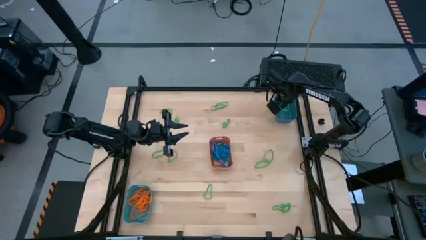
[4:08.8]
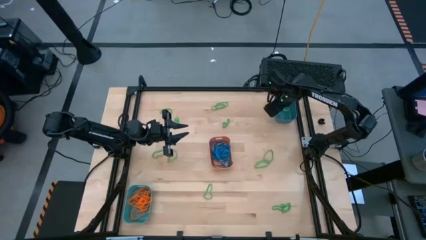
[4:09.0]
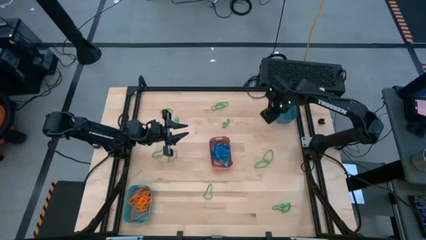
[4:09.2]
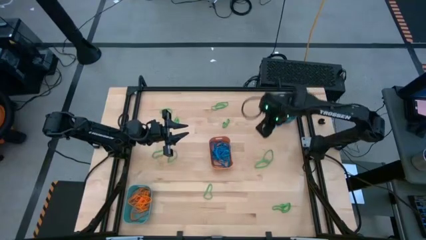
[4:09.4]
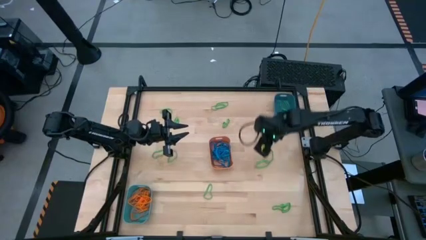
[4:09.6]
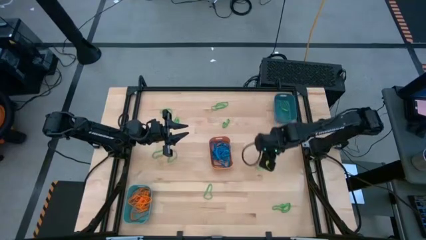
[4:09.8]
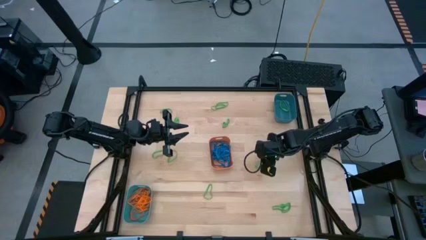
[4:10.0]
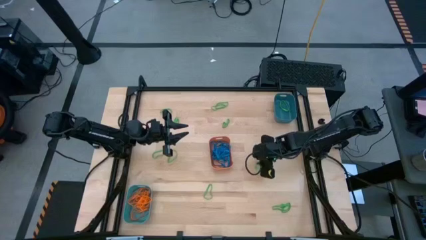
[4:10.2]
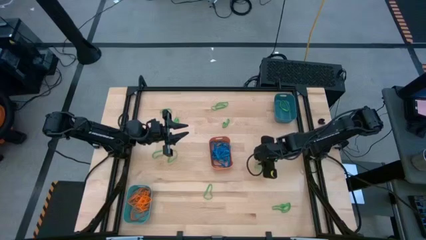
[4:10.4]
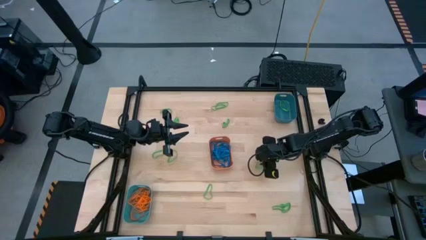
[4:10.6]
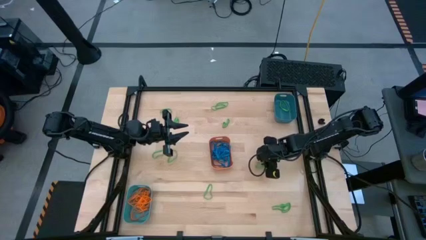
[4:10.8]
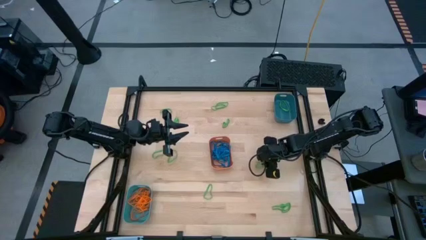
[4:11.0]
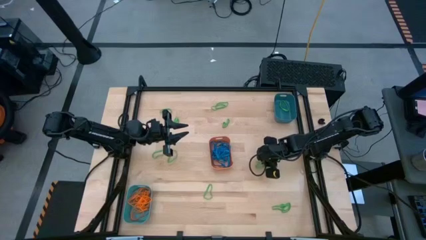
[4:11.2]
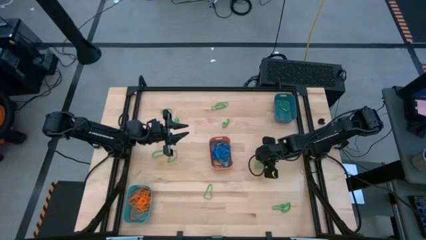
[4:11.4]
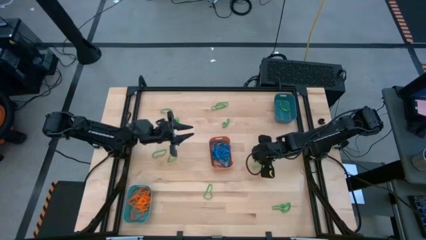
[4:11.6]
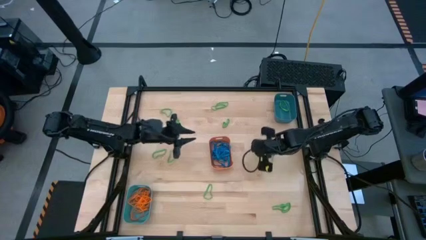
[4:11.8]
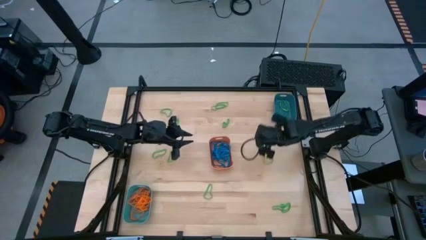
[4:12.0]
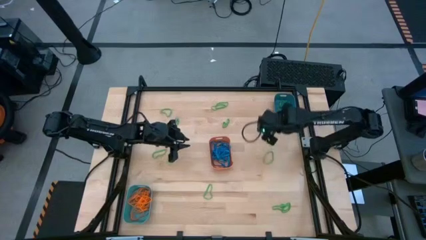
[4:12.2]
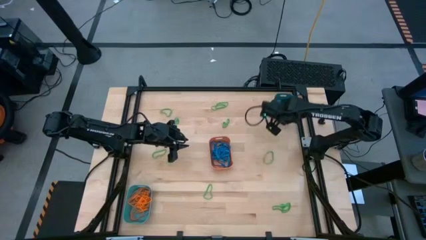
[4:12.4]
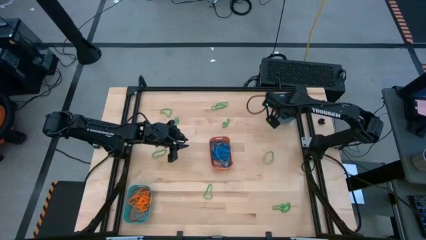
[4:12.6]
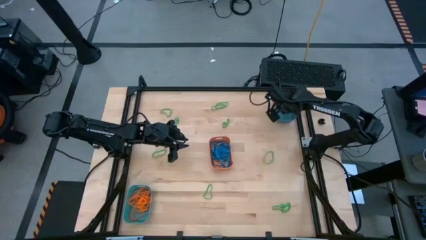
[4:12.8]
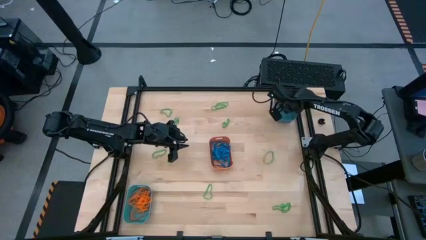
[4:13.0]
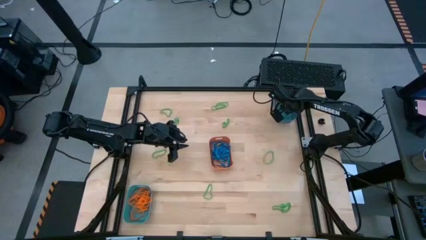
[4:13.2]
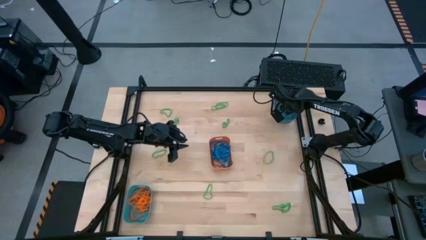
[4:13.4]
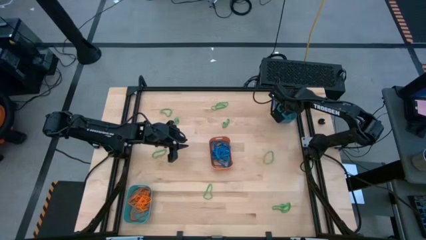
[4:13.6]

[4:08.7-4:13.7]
Task: Sort rubber bands into baskets
Put the green rubber band into the blue bin

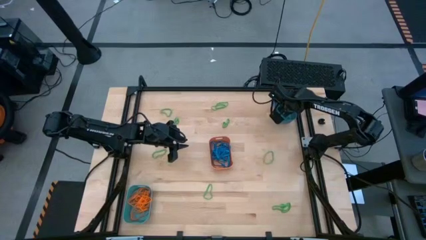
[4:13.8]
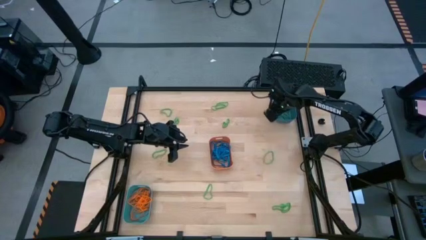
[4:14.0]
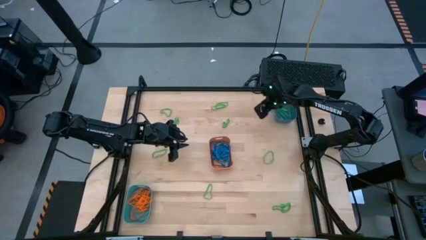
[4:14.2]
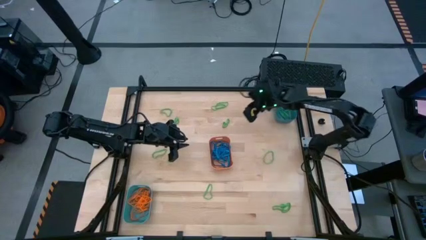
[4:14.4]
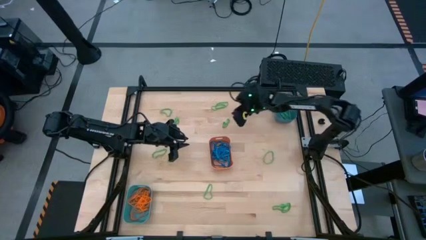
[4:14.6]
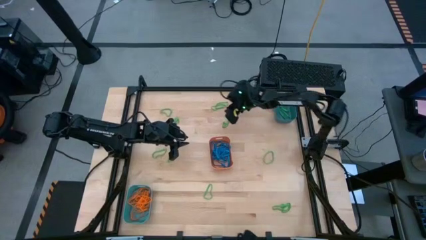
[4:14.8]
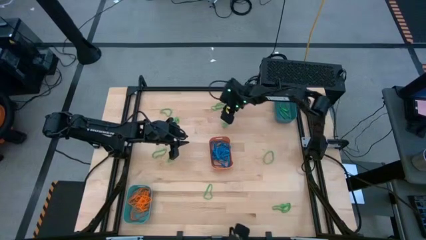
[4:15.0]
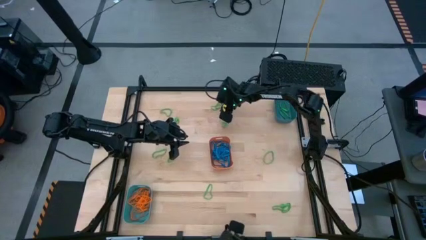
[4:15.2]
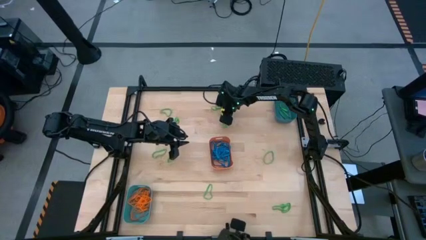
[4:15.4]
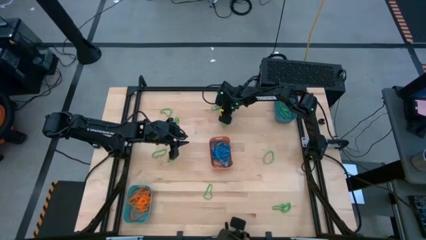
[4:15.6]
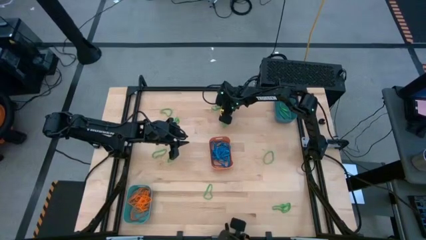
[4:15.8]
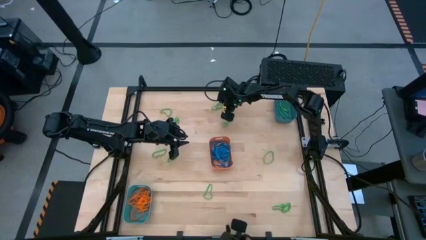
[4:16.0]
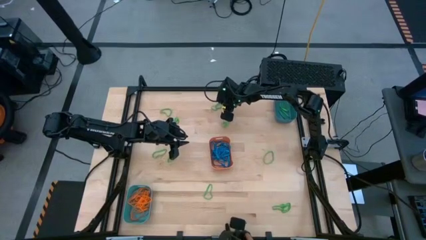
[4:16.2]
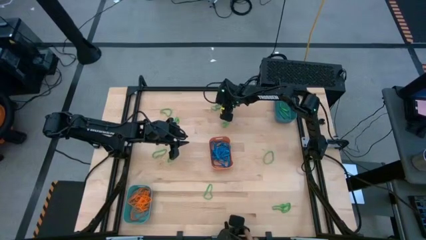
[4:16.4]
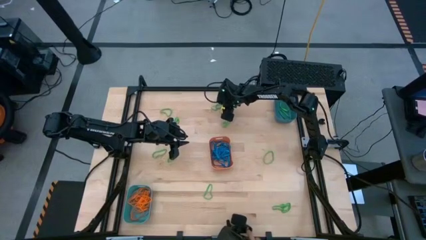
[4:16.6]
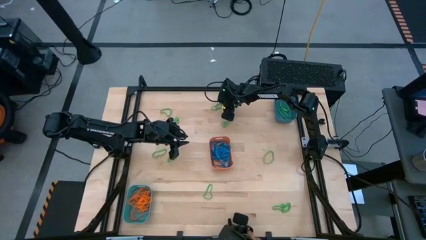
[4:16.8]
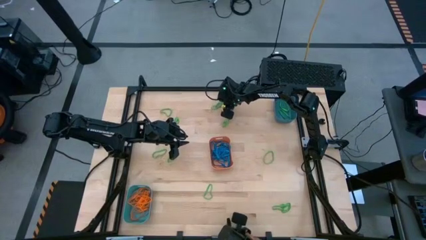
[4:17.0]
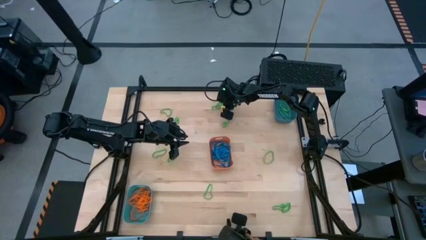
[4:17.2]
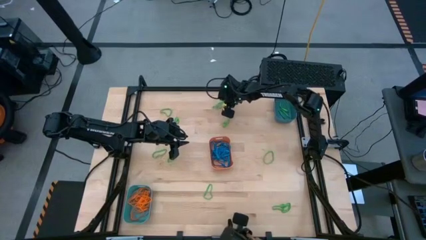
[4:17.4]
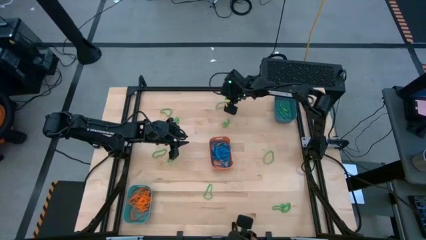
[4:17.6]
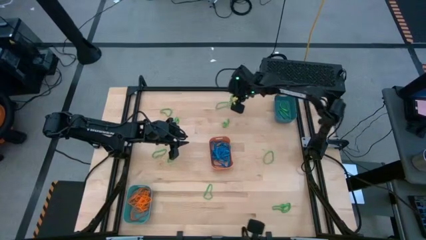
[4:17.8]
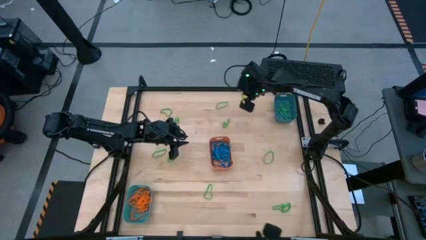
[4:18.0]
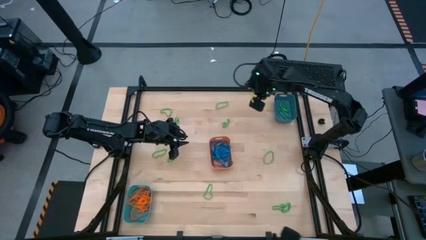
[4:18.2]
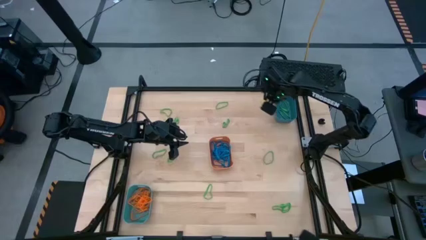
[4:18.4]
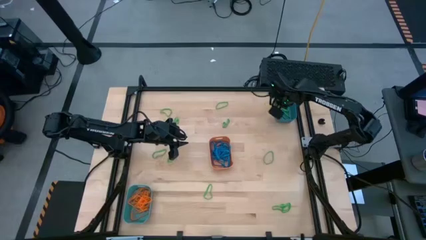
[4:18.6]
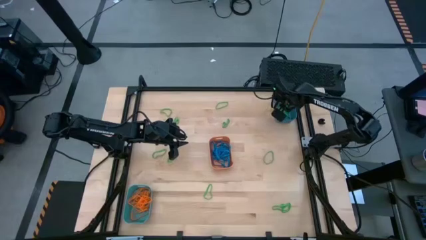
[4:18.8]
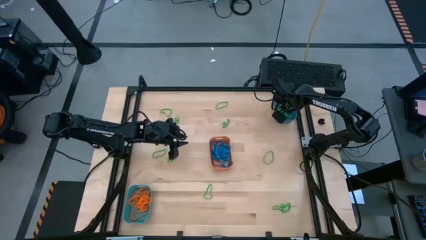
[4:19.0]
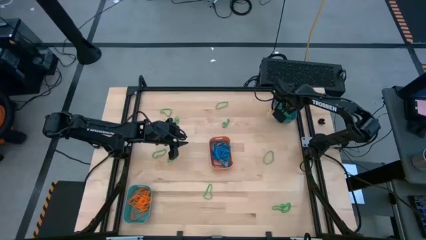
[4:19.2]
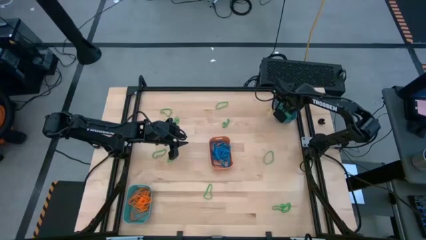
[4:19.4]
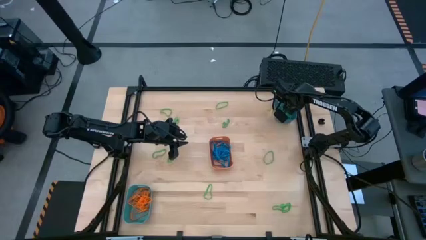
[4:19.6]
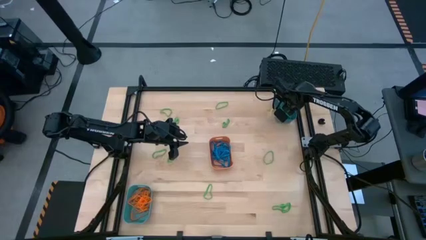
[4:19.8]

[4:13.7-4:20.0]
Put the green rubber band into the blue bin

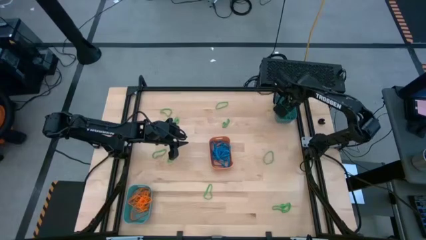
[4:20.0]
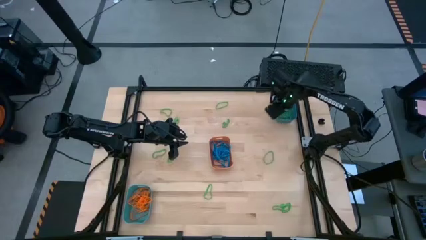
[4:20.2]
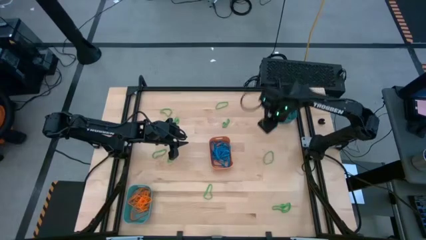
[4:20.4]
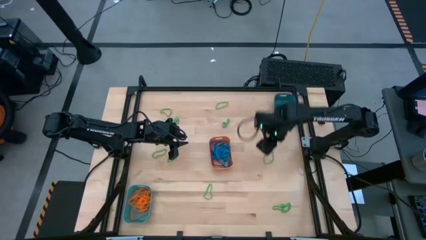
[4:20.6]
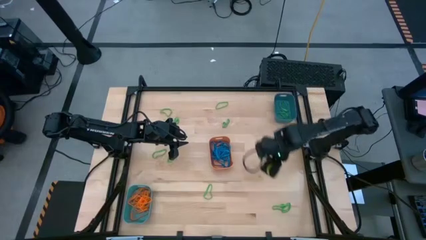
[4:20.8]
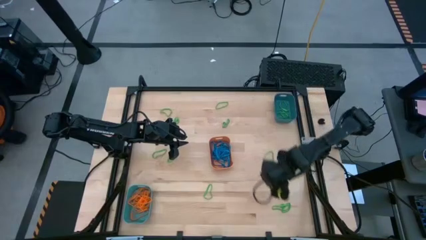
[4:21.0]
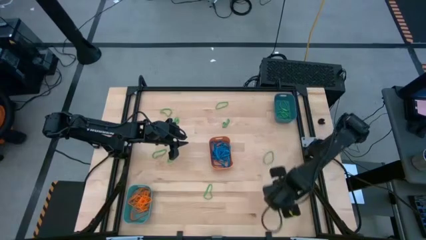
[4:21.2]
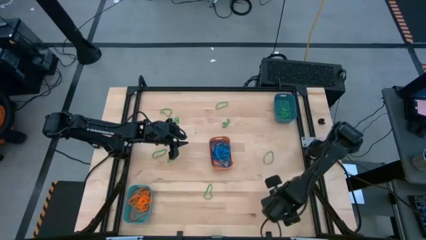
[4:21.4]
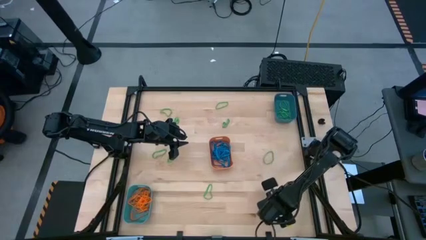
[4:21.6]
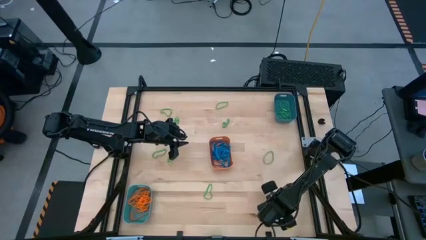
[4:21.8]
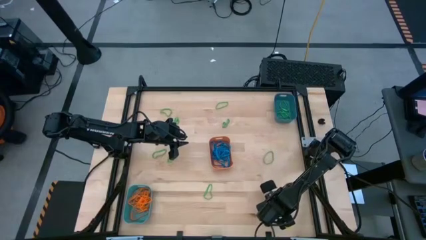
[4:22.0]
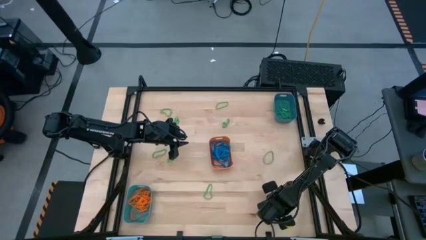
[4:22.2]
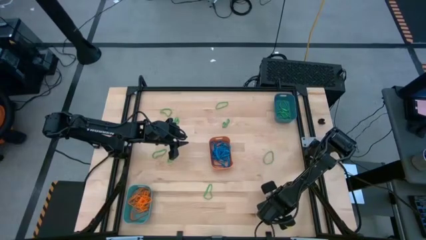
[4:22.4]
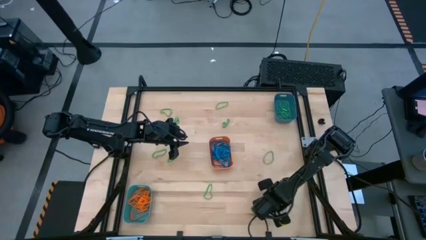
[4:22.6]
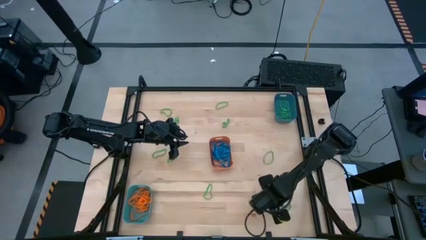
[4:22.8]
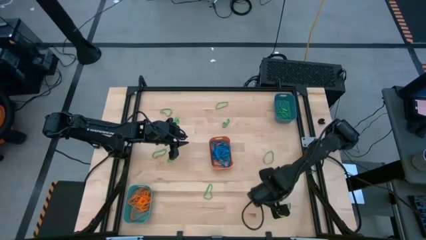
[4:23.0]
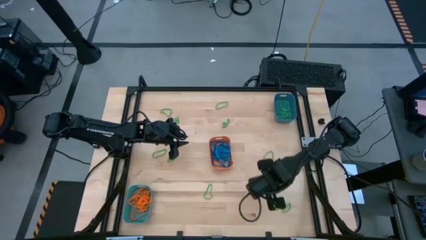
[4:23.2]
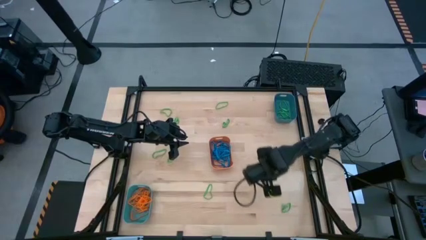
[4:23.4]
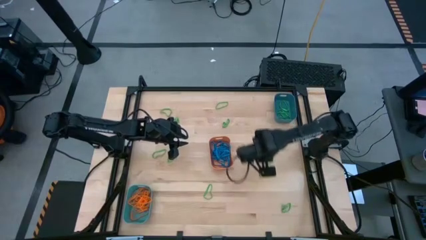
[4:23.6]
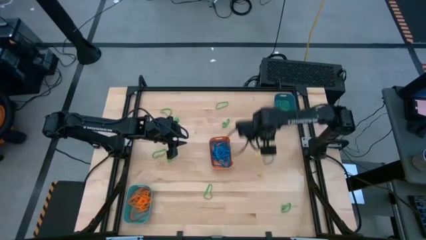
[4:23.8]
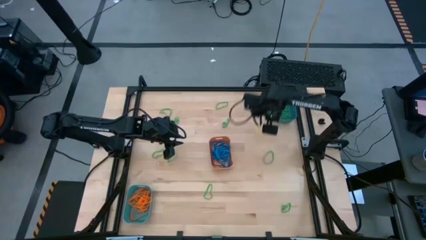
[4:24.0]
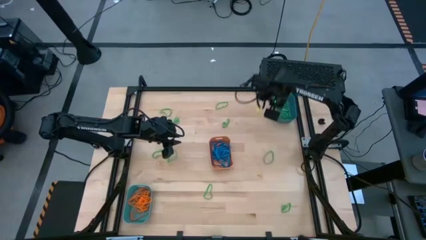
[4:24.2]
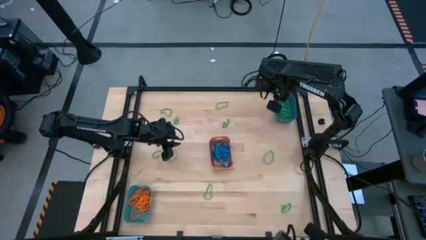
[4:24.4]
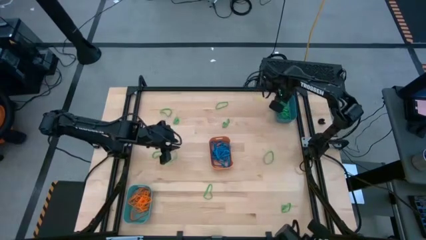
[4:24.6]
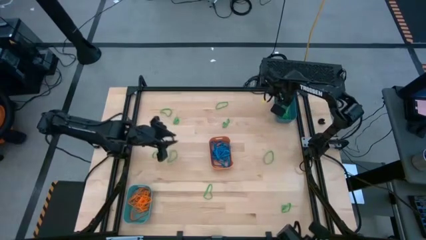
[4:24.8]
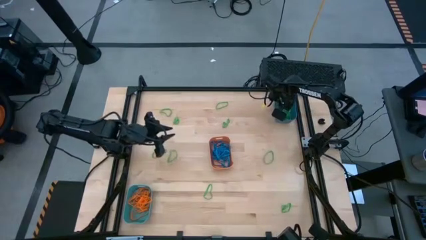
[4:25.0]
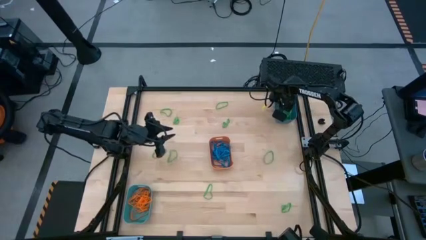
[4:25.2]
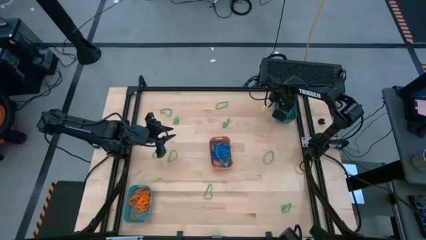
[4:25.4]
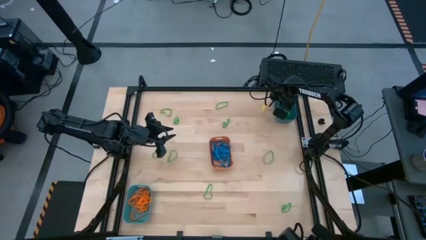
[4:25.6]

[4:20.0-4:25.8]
Put the green rubber band into the blue bin
